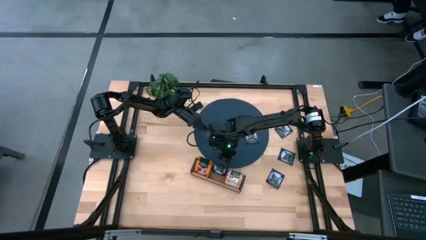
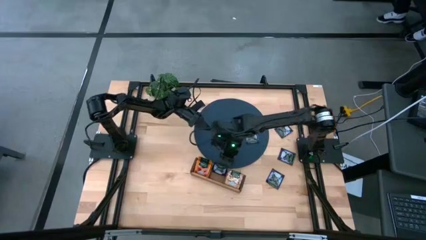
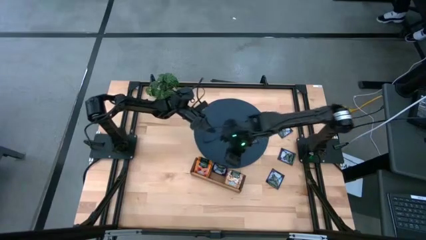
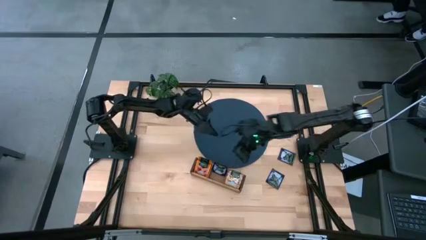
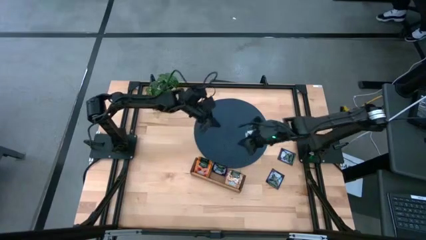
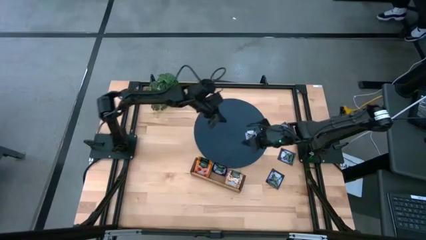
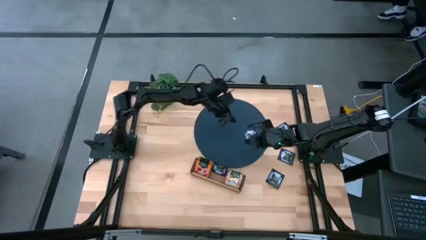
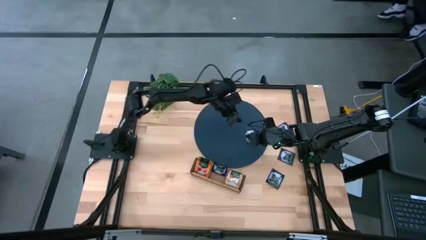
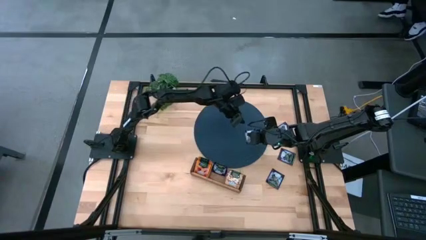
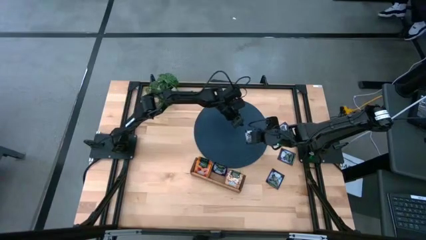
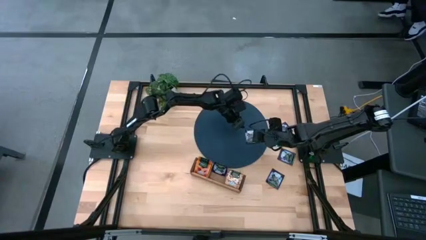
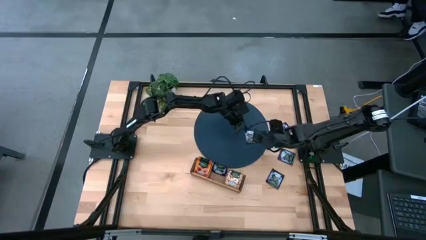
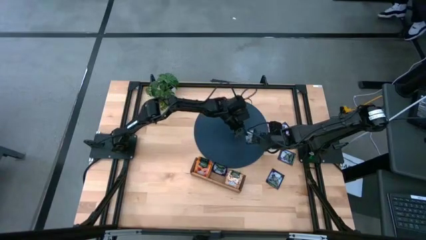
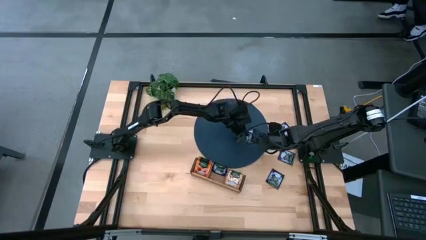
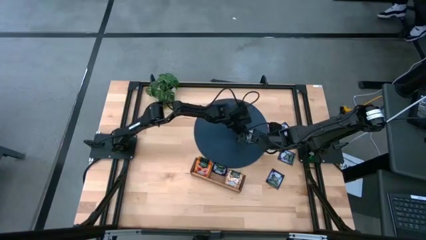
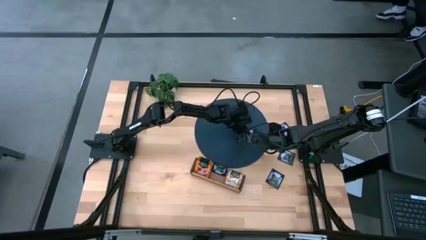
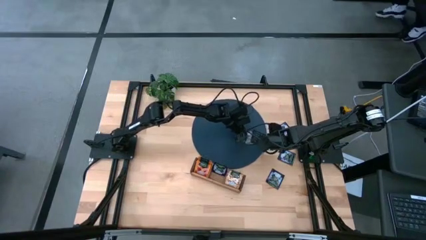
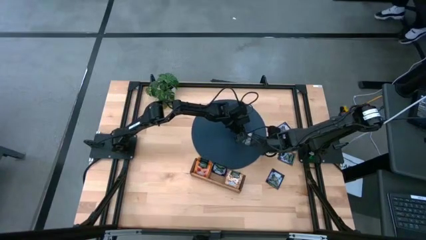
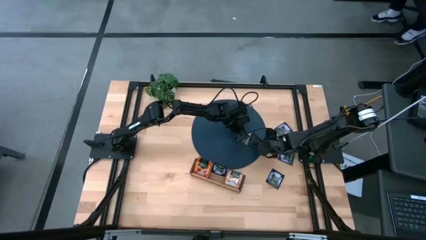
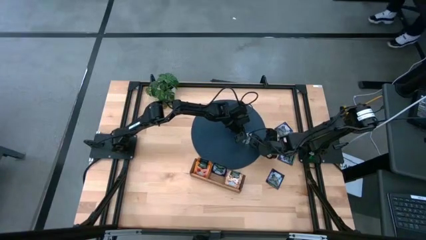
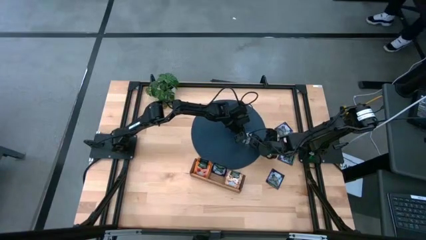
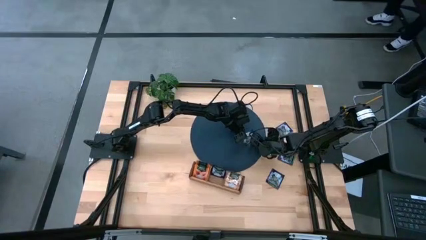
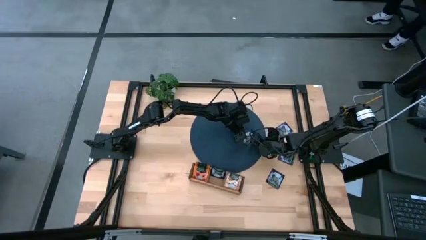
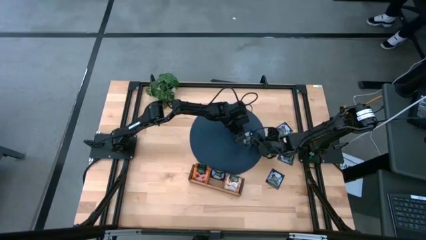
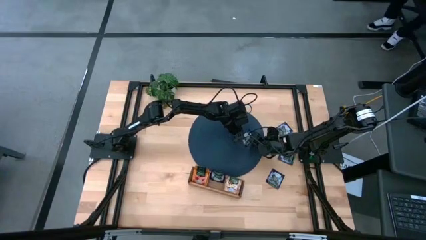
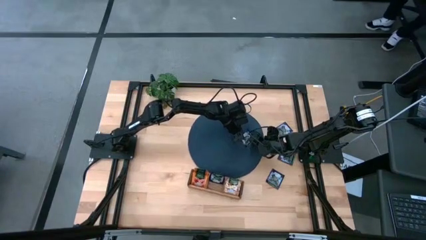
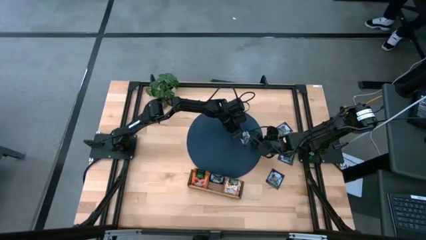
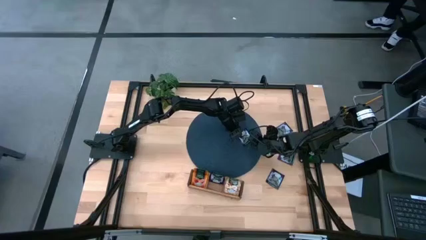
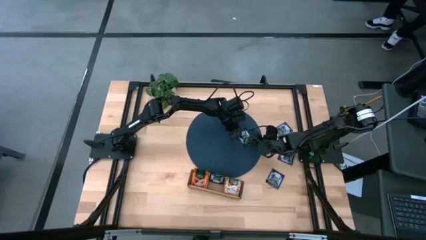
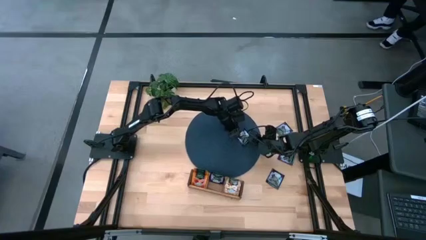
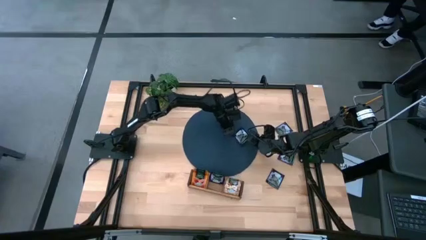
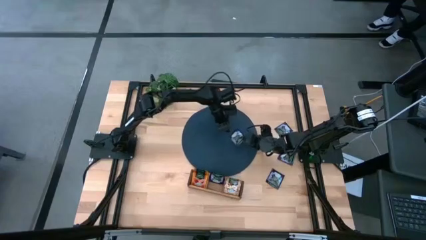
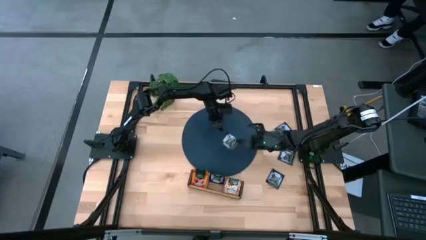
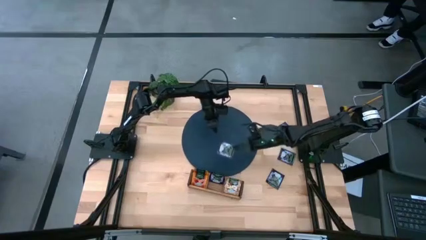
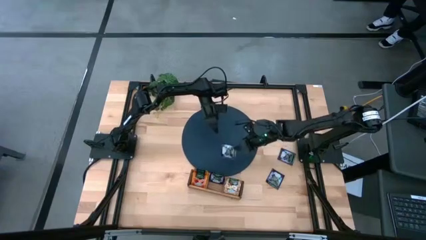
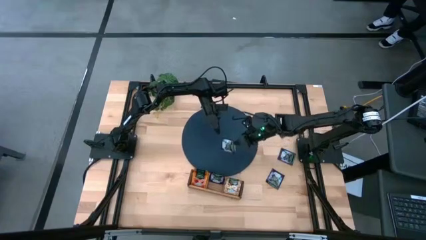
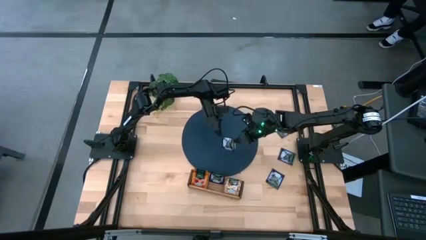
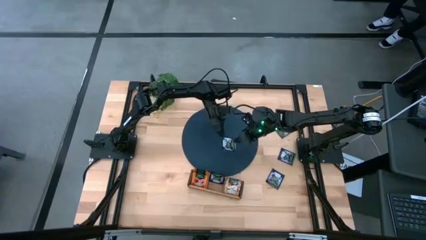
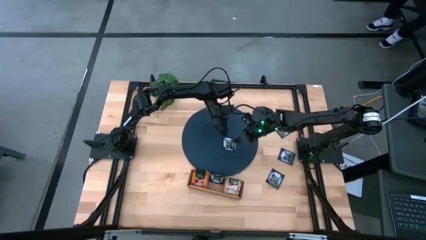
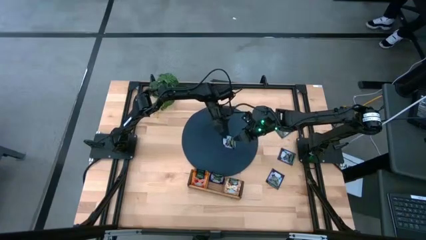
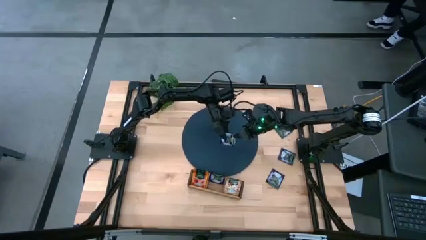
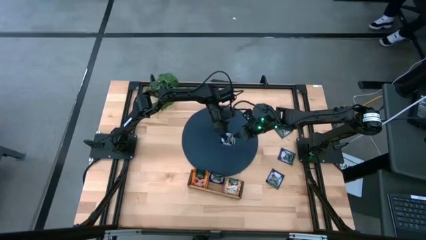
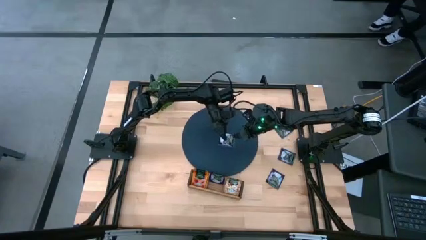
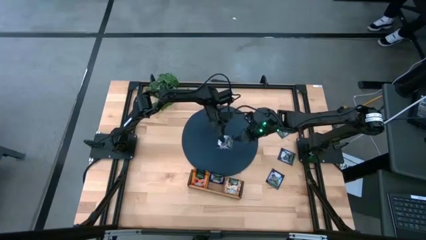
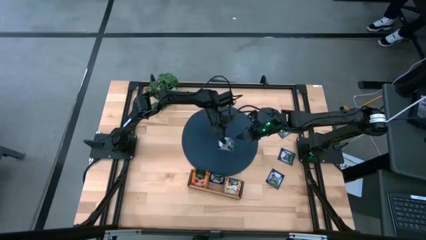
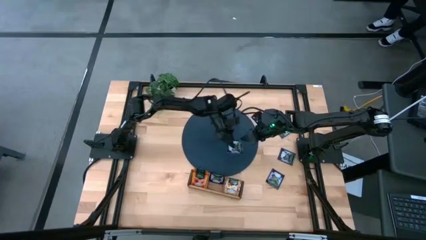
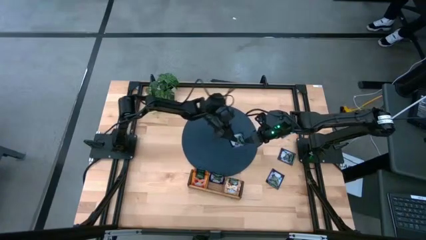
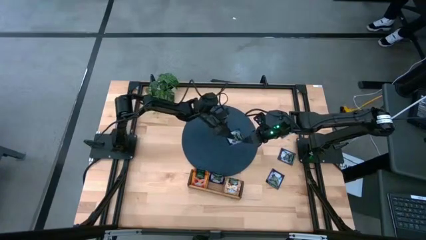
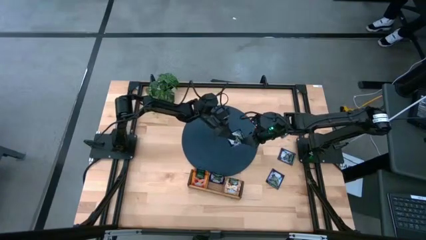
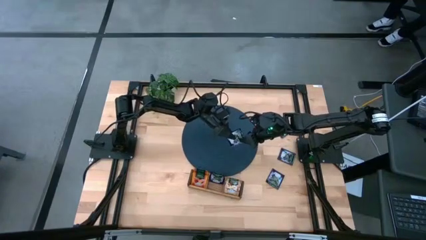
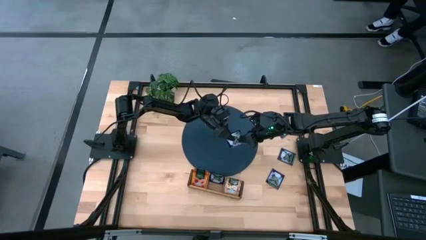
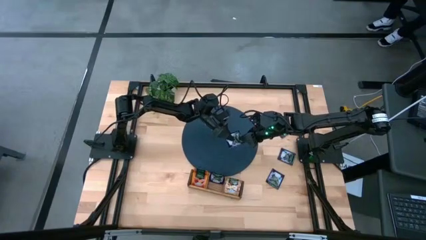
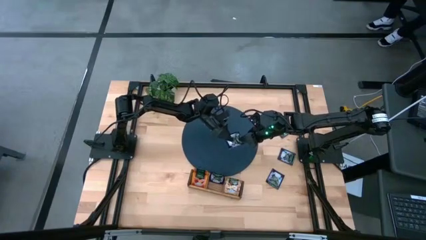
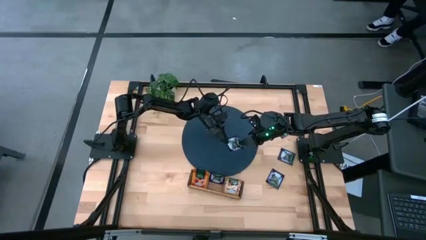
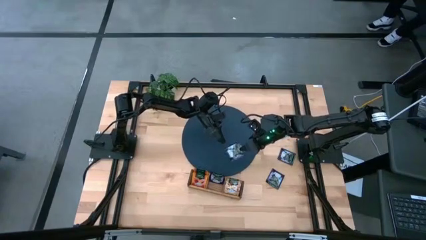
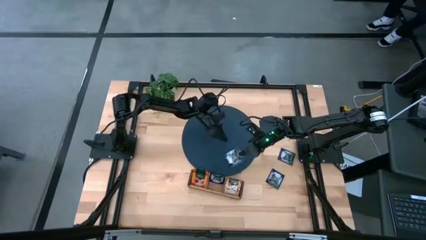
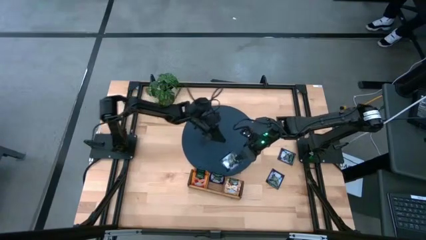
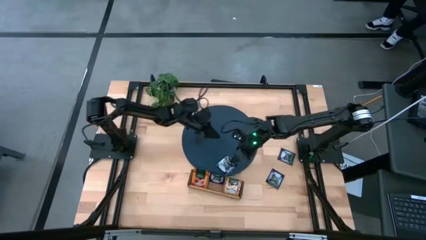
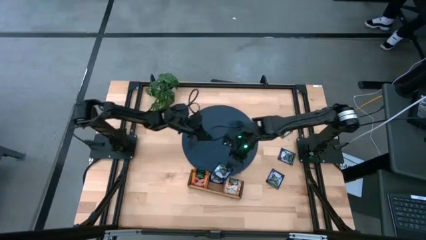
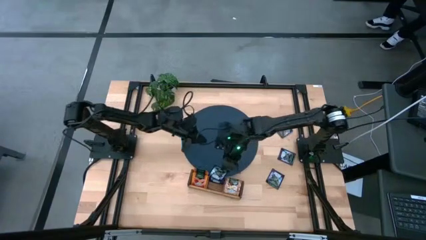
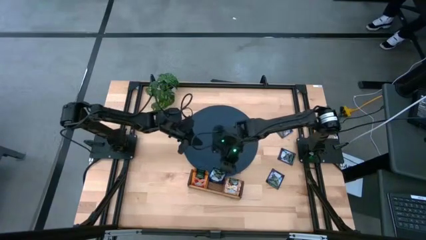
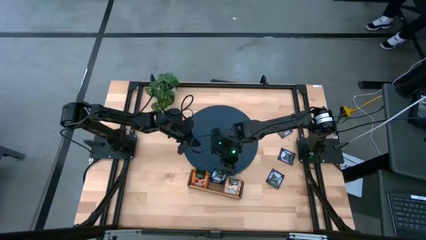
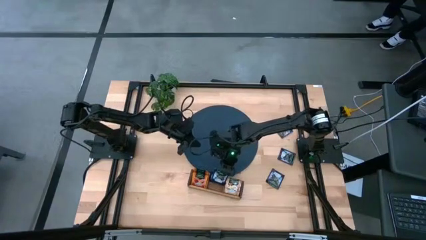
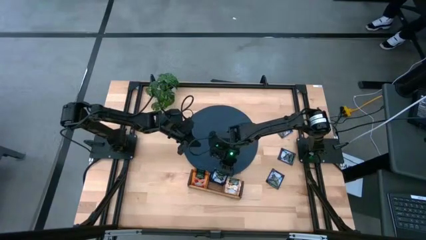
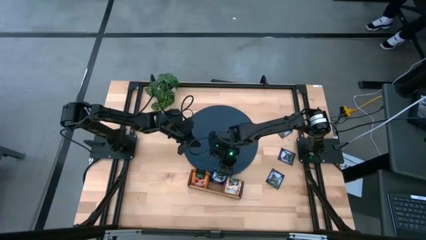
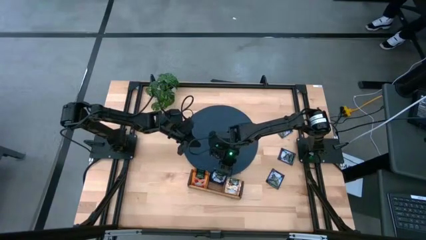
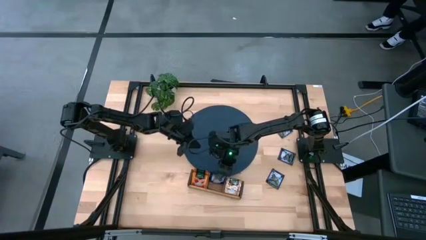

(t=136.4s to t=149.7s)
Task: Pick & Place Tea
Put the violet tea bag into the middle section of the wooden organizer

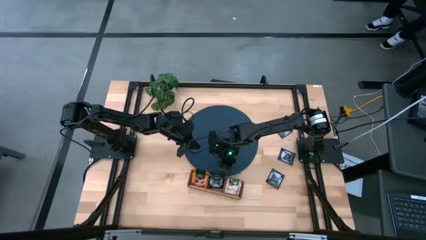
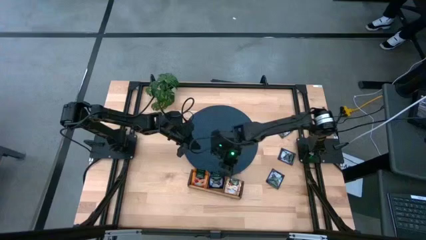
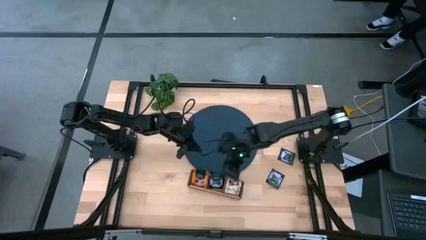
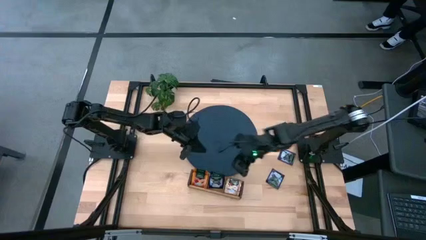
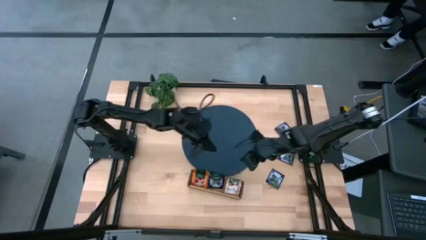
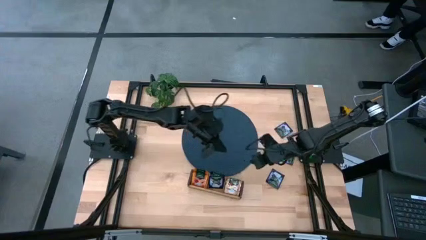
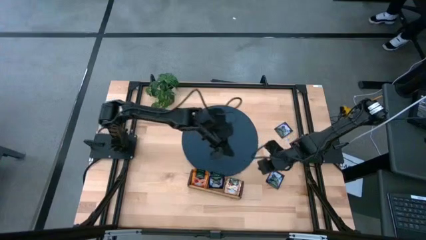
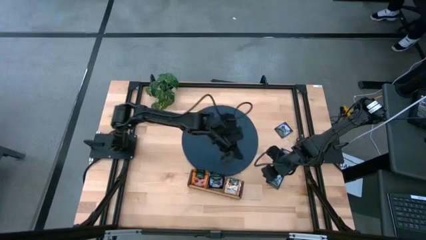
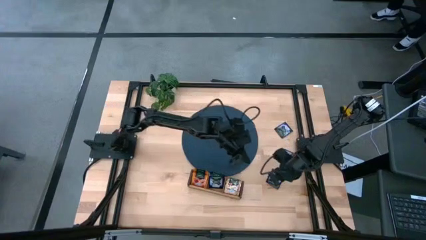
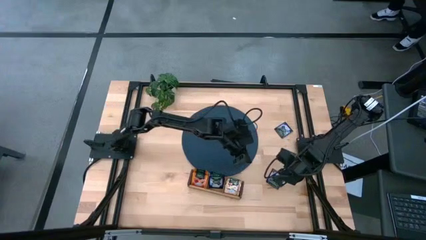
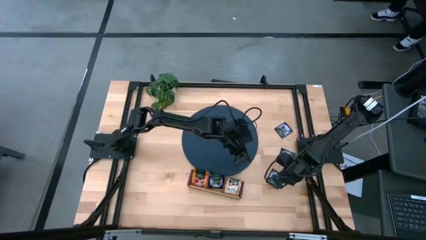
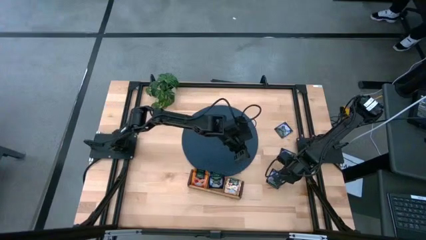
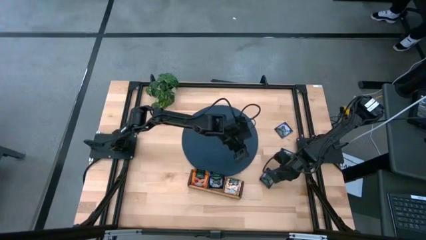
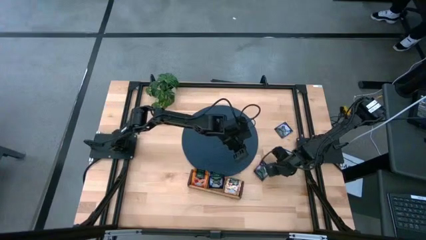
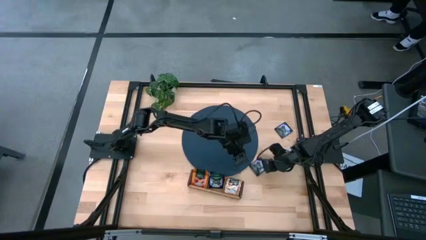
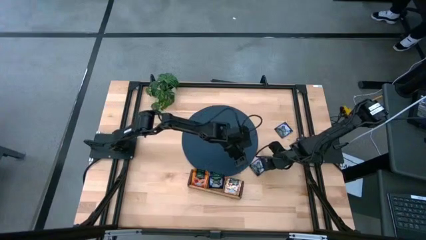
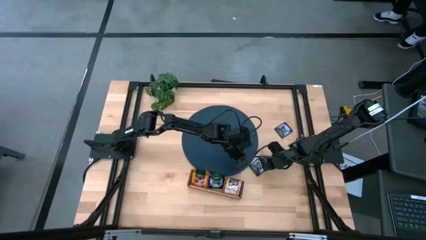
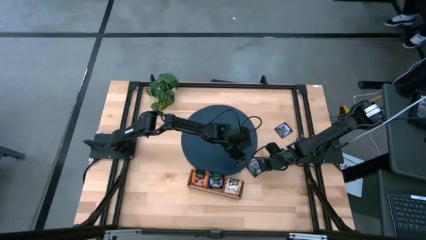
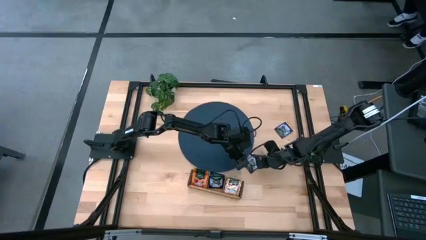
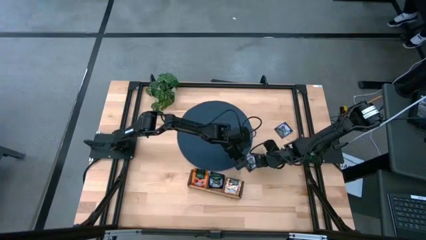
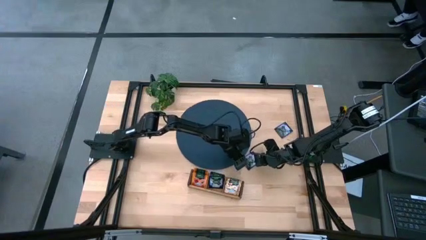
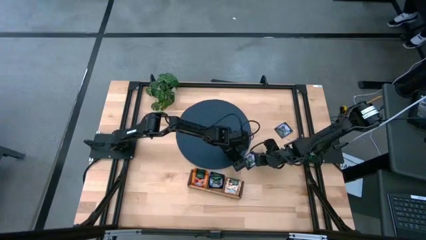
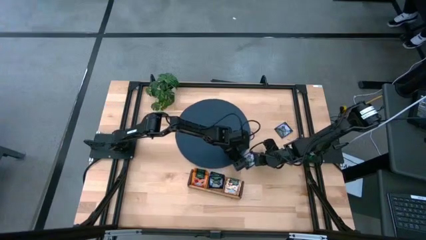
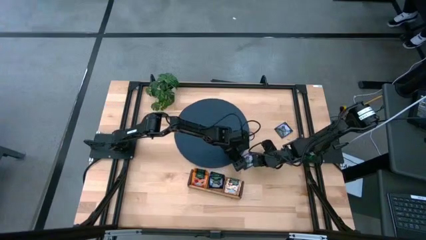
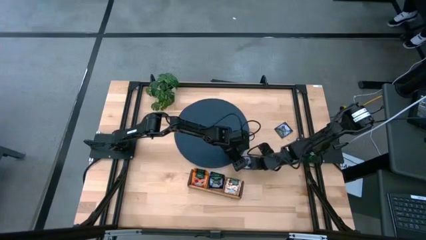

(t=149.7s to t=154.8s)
Put the violet tea bag into the middle section of the wooden organizer
